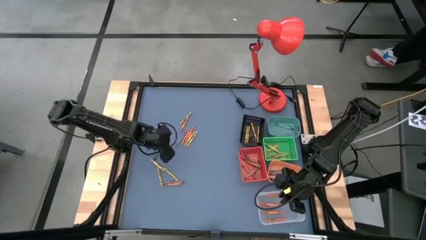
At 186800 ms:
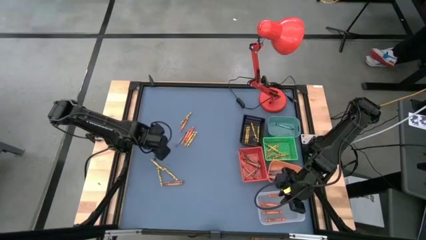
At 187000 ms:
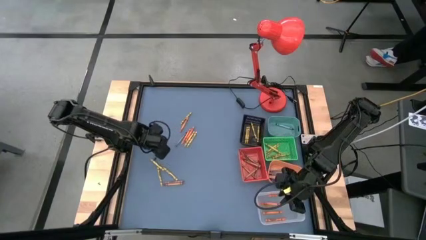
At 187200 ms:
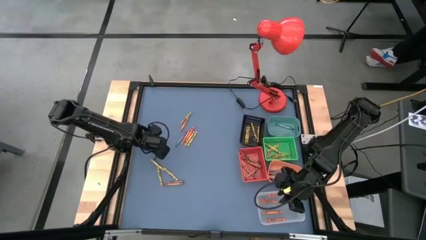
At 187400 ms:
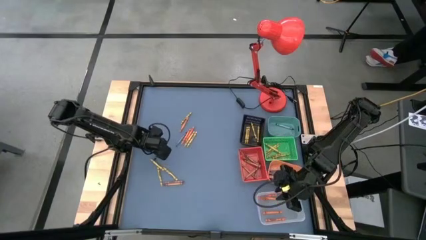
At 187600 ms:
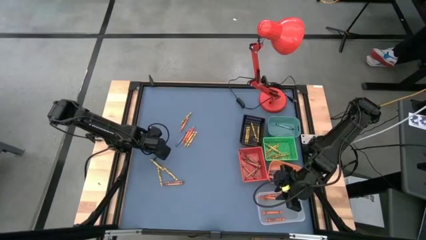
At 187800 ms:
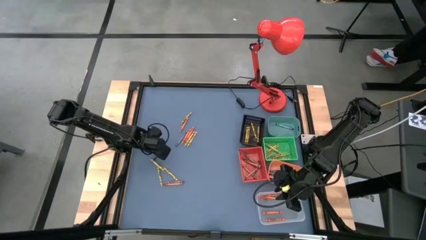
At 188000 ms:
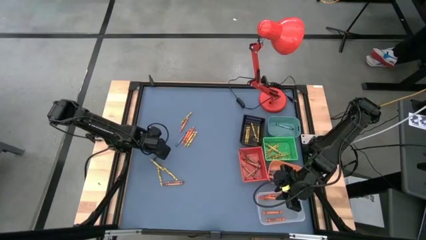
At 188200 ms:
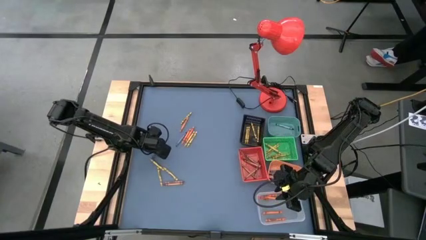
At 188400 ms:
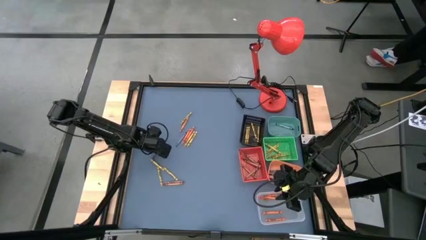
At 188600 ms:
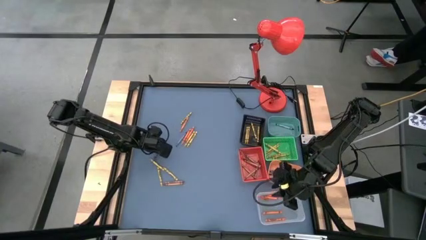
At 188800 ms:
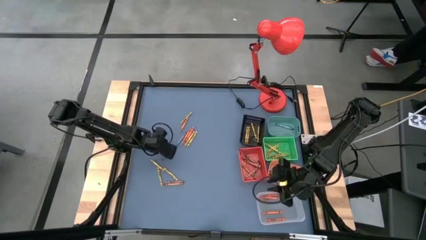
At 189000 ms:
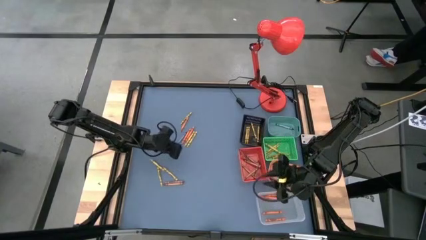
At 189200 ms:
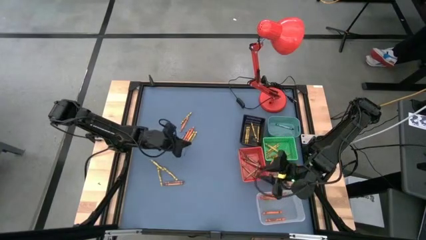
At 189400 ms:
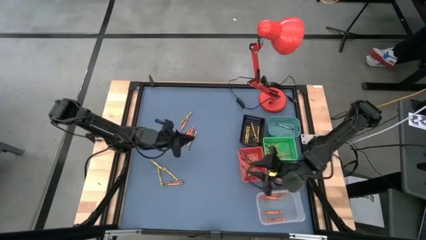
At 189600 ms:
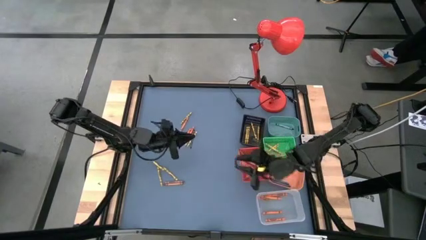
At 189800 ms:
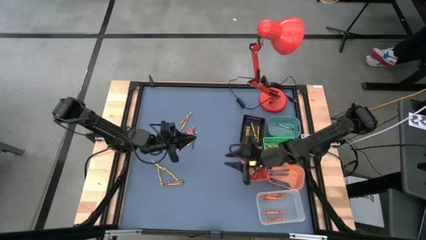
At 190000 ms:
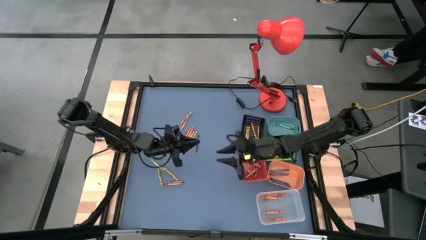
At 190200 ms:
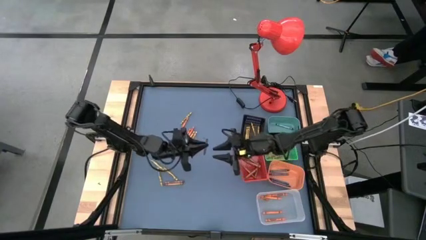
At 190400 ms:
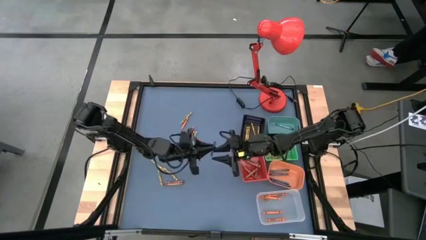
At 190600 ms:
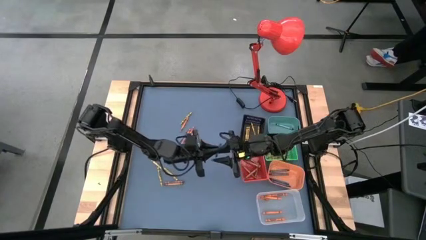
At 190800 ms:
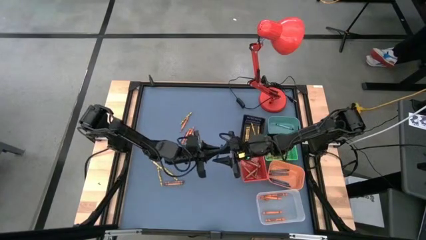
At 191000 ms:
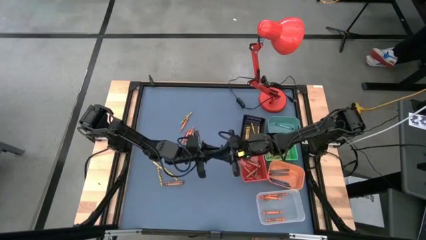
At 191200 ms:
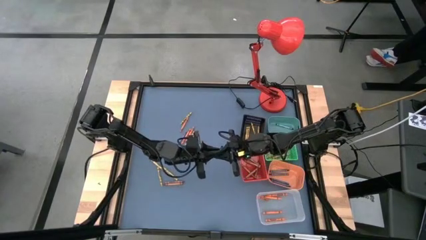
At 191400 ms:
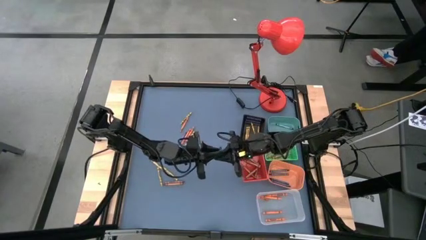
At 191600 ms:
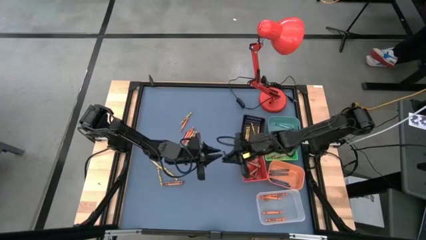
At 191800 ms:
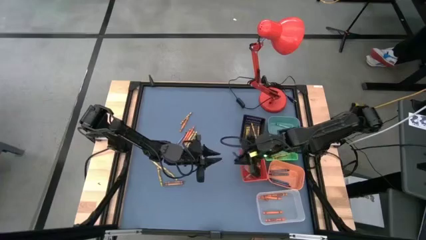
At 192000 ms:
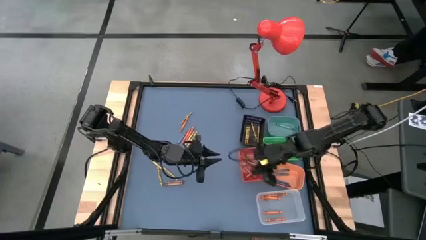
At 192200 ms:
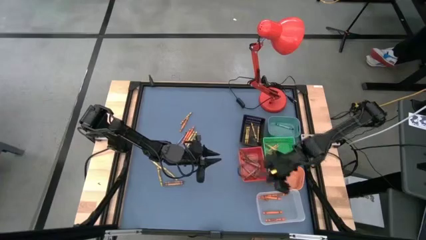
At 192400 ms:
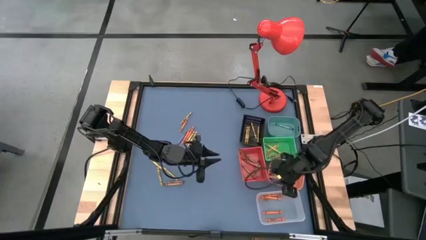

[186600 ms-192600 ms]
Task: Sort crayons
Put the blue crayon into the orange bin

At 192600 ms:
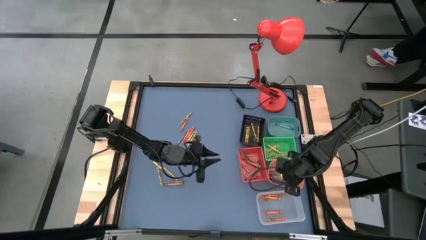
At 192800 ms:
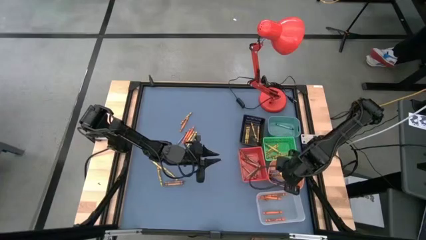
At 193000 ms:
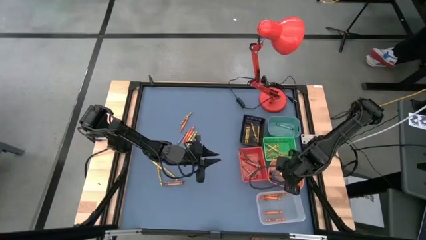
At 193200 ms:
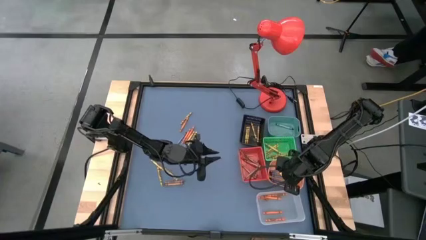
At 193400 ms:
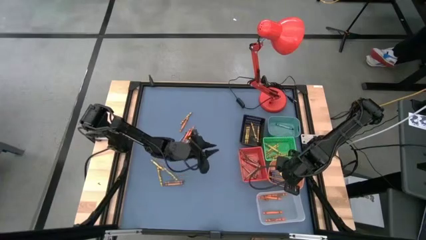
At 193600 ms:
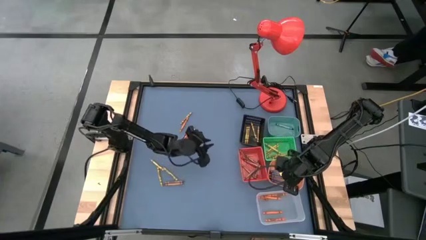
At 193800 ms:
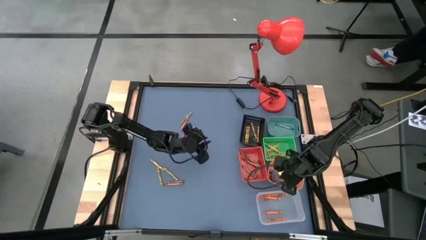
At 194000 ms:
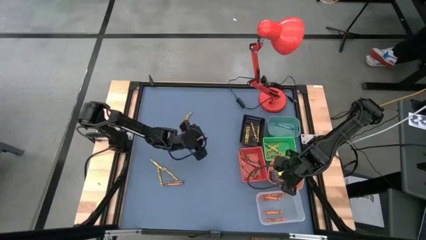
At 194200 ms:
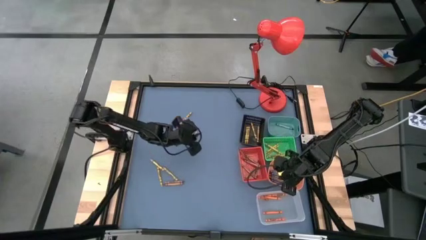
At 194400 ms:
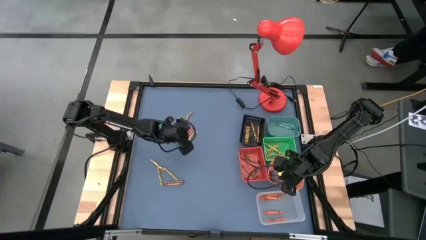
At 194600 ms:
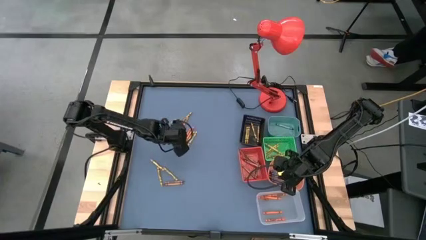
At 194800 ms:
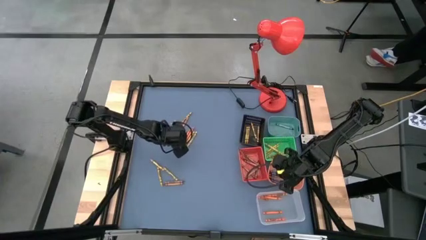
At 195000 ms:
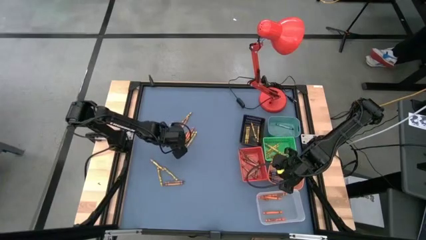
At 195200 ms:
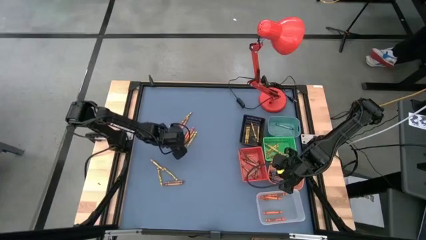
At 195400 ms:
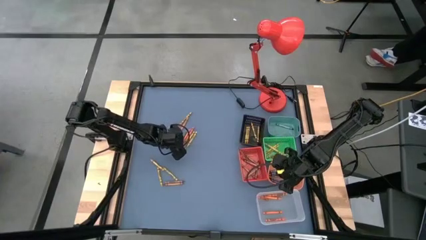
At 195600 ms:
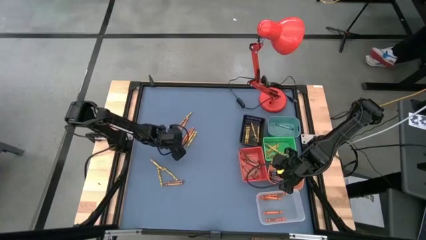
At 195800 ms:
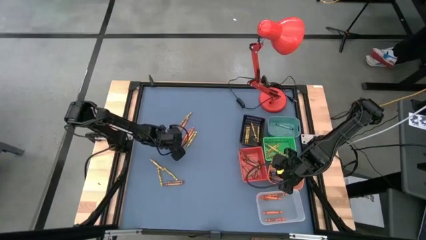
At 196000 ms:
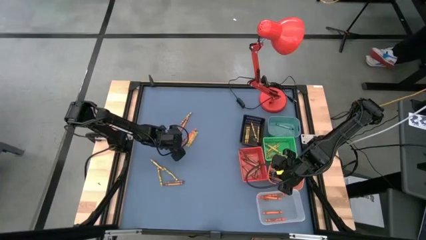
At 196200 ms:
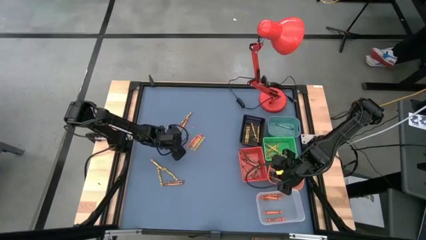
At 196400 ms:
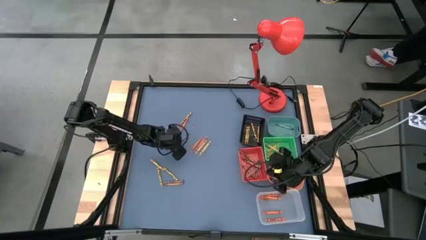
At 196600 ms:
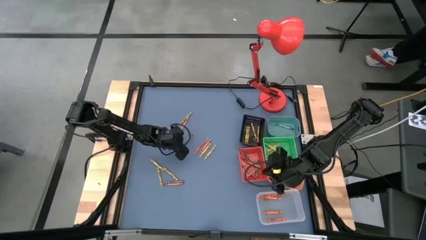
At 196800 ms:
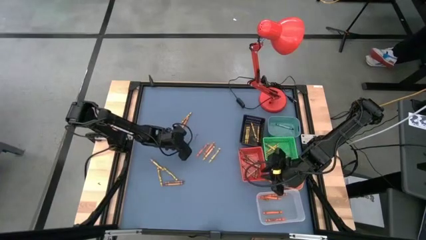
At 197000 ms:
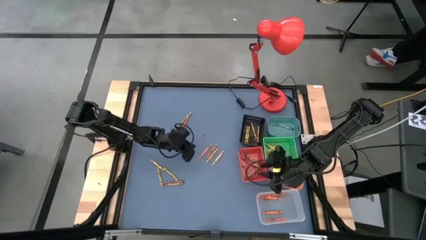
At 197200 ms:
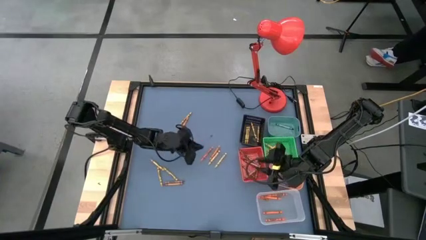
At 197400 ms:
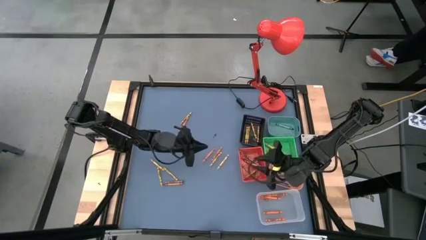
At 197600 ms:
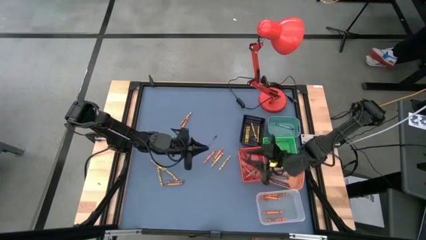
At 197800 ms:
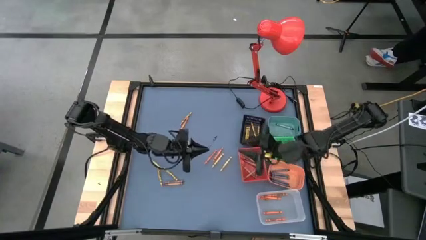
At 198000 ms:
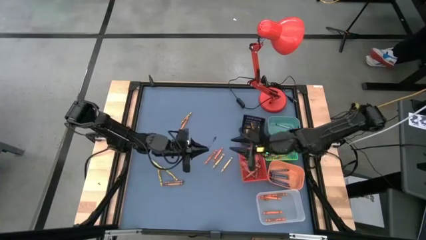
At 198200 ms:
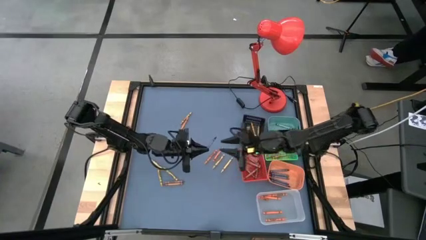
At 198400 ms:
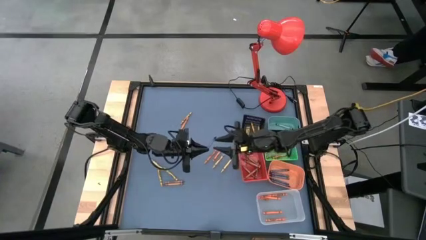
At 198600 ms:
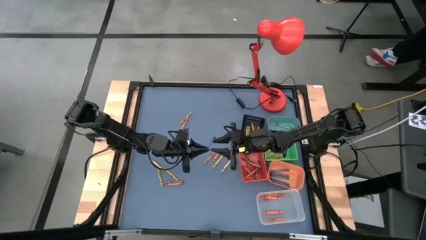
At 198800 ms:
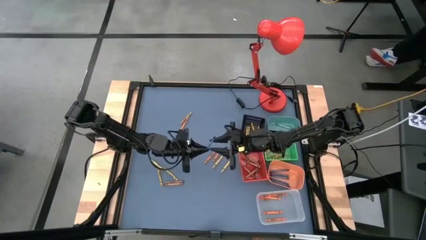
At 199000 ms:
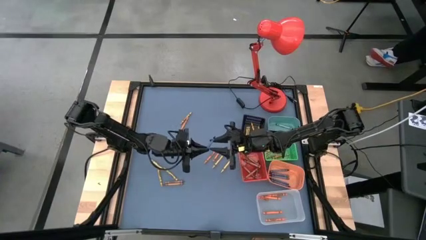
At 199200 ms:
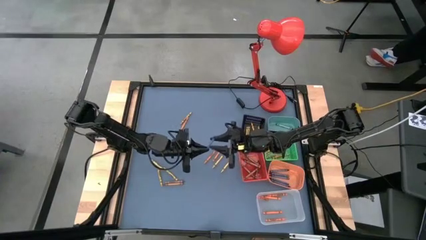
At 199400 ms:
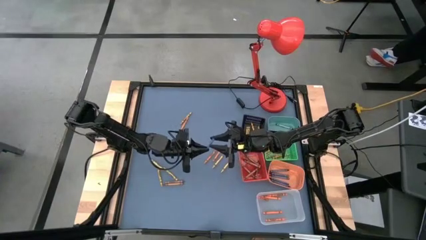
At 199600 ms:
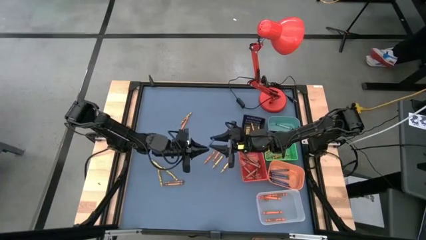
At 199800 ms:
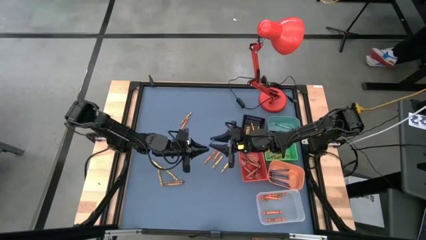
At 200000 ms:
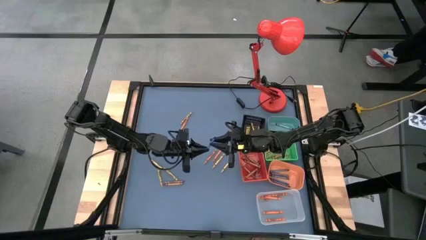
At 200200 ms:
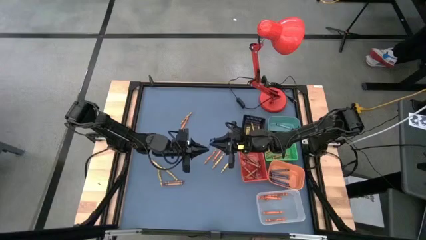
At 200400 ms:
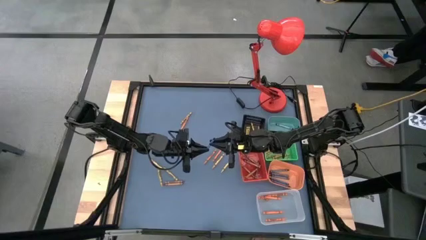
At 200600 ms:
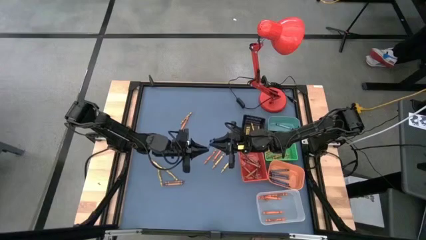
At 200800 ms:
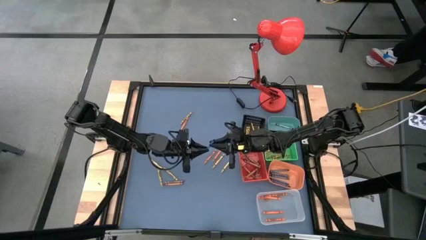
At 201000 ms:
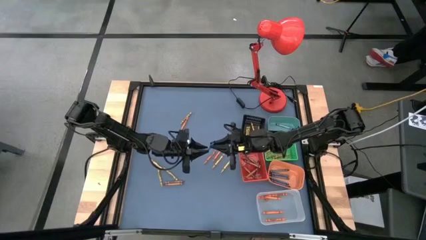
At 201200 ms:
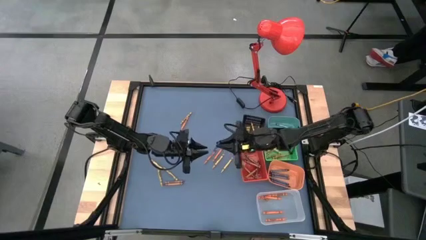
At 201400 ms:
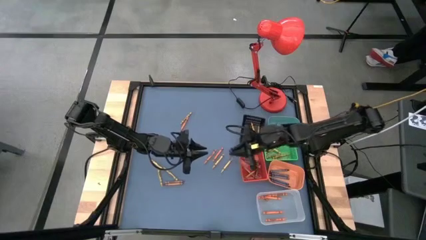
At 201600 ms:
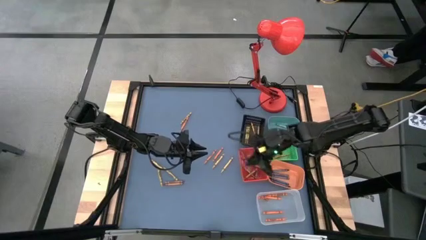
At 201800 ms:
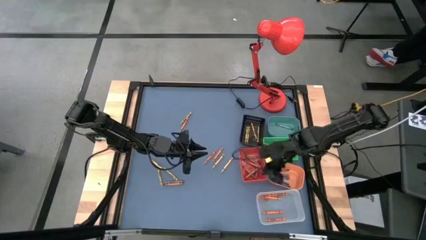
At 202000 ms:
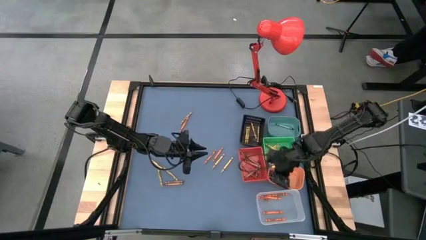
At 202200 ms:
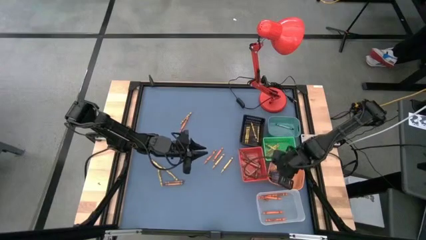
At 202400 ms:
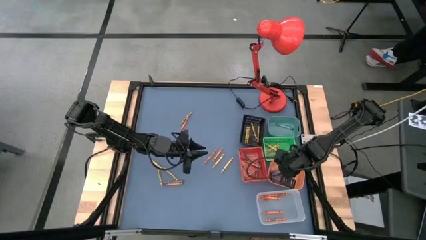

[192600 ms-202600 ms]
Put the blue crayon into the orange bin

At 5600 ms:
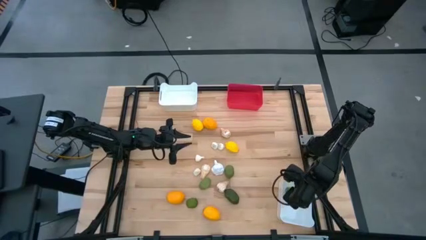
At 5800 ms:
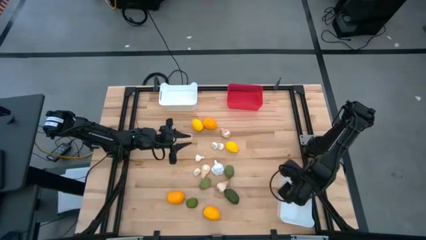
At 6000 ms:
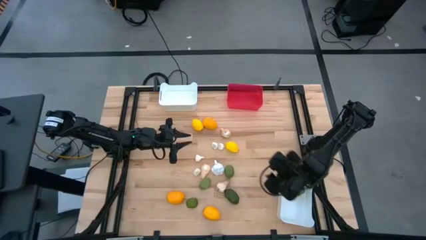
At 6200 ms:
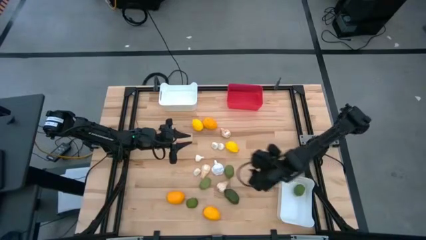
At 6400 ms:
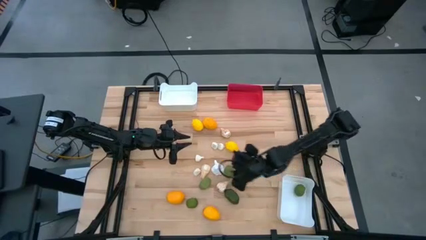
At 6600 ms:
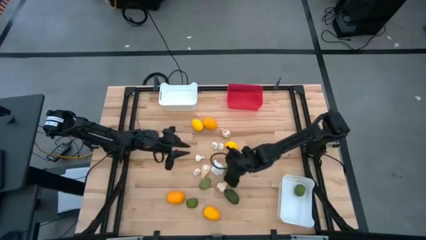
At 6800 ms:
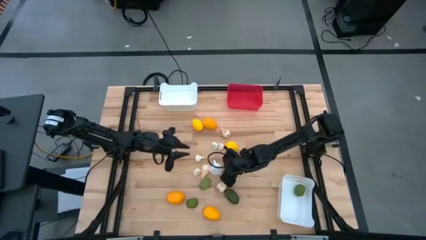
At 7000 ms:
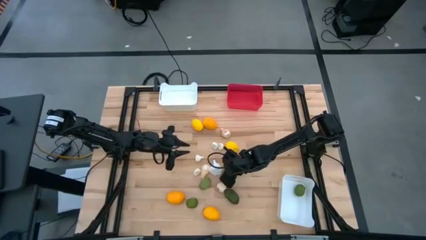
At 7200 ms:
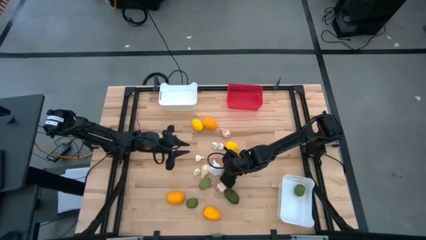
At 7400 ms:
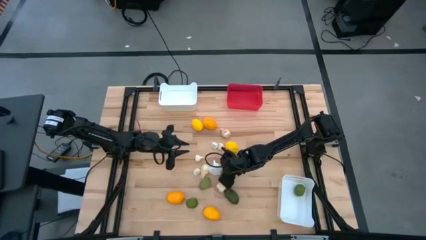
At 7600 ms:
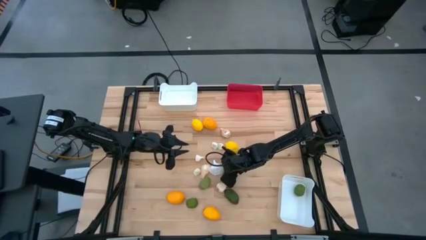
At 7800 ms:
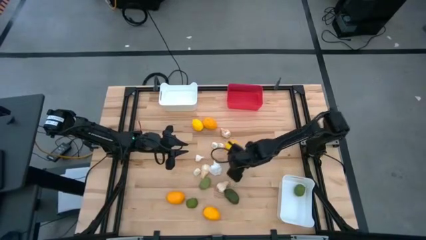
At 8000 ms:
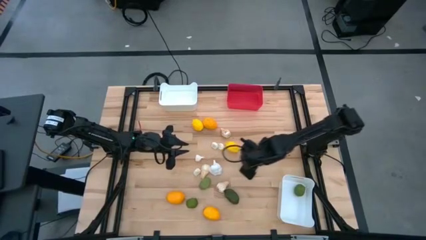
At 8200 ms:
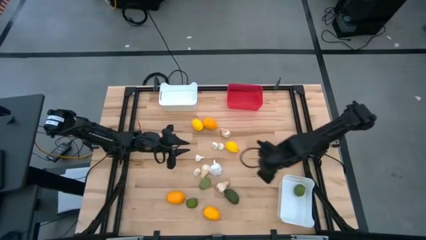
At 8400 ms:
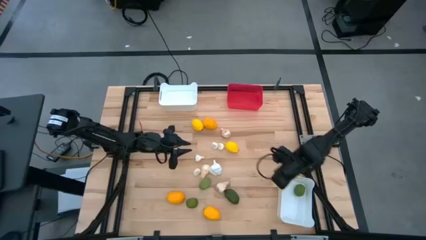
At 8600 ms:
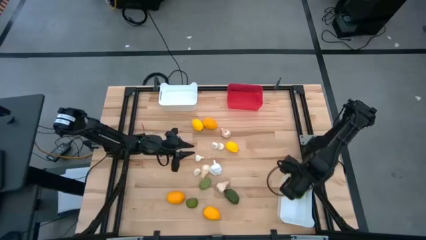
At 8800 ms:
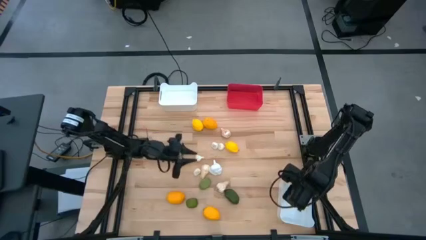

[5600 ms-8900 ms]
Task: Sort produce into baskets
Put the green lime into the bottom white bin
